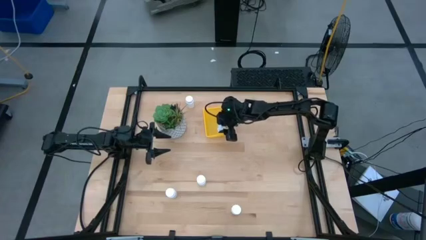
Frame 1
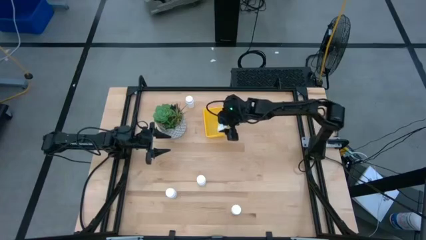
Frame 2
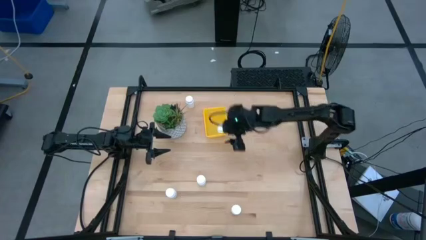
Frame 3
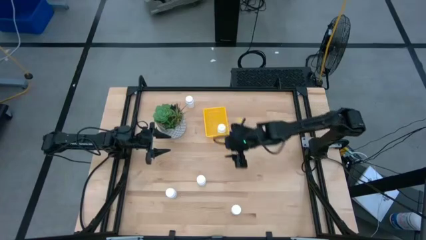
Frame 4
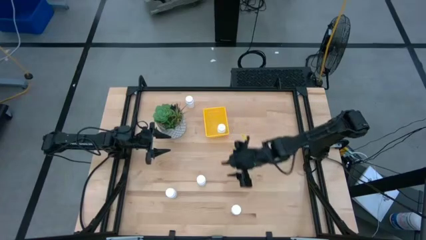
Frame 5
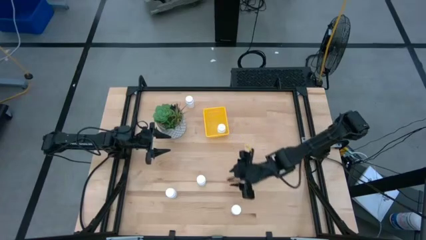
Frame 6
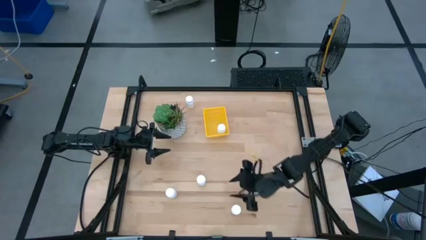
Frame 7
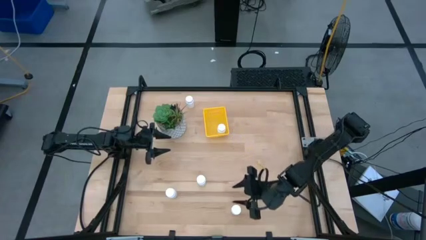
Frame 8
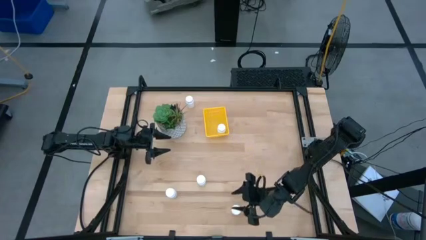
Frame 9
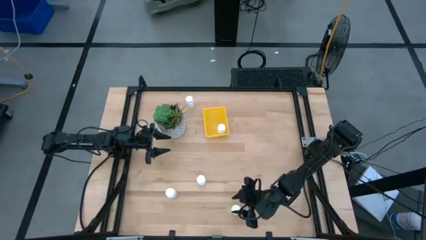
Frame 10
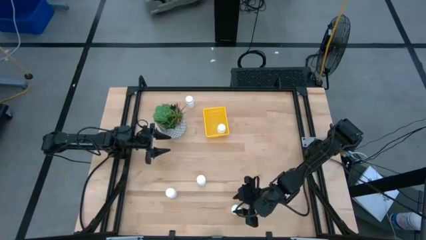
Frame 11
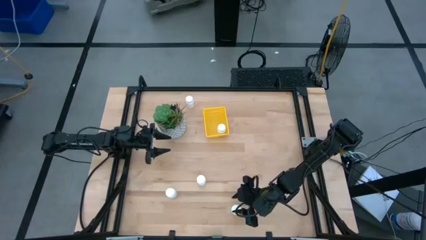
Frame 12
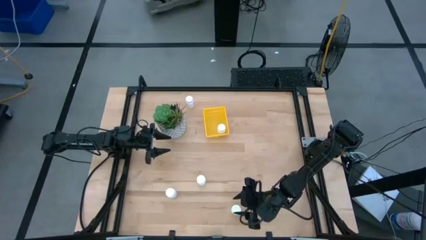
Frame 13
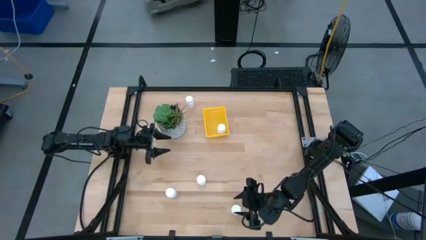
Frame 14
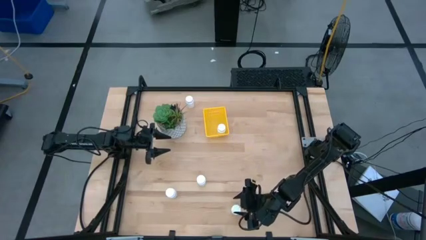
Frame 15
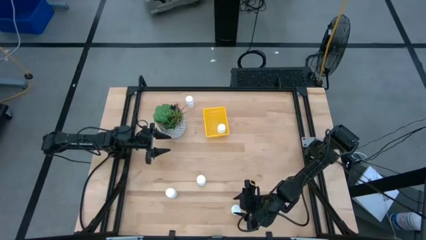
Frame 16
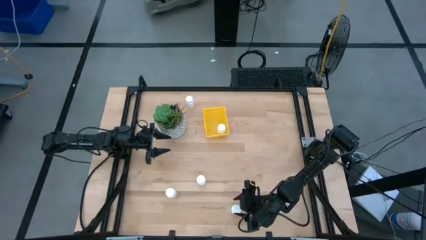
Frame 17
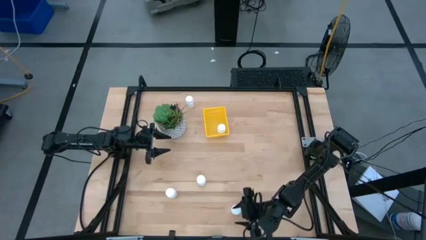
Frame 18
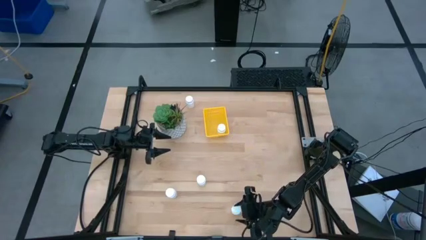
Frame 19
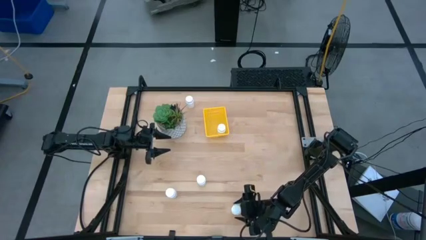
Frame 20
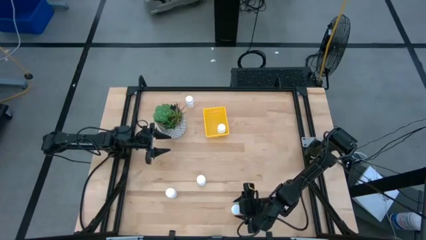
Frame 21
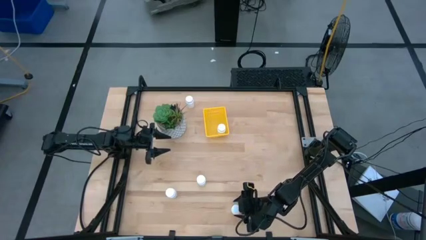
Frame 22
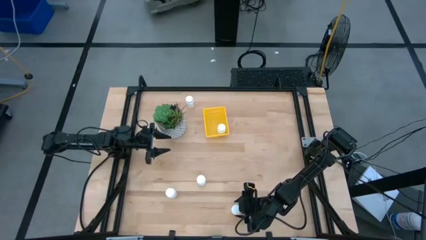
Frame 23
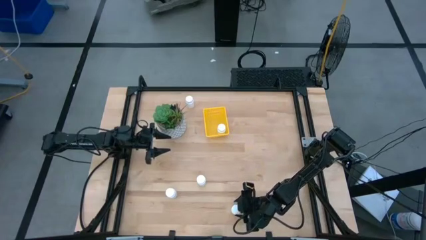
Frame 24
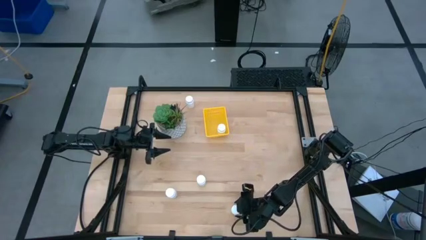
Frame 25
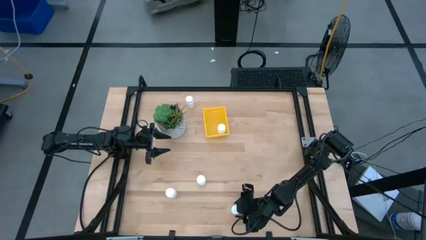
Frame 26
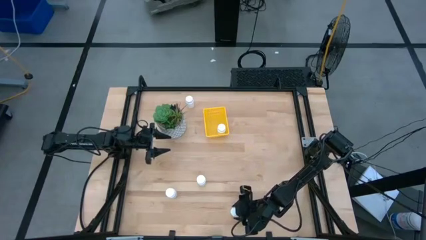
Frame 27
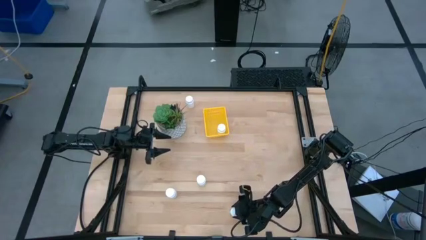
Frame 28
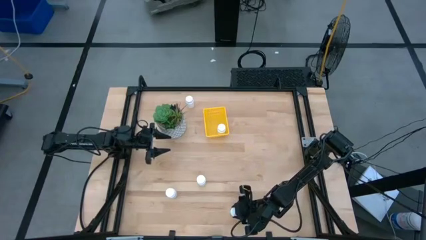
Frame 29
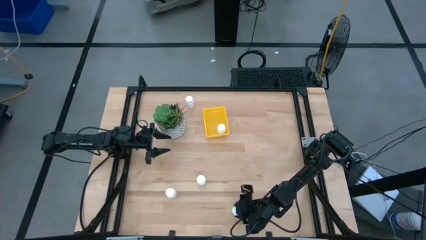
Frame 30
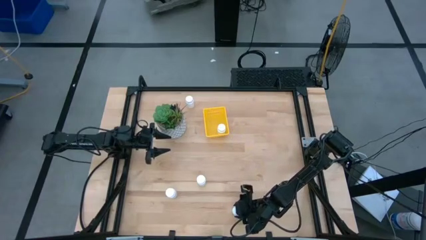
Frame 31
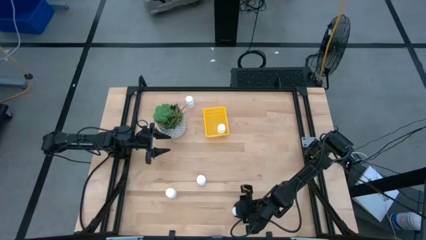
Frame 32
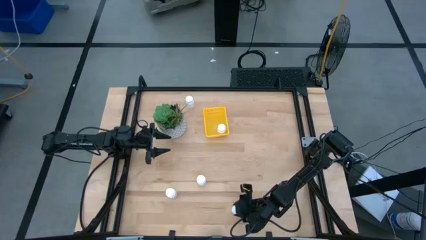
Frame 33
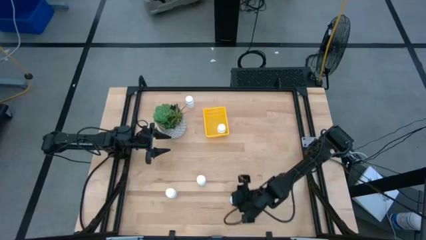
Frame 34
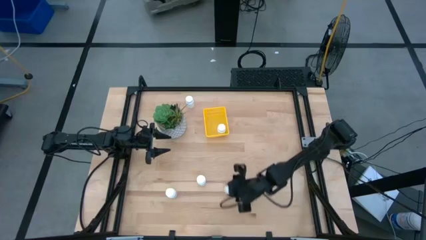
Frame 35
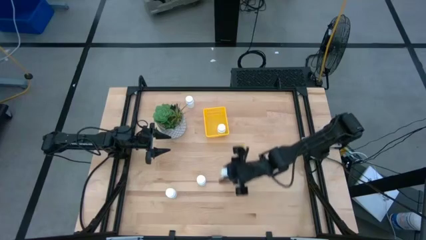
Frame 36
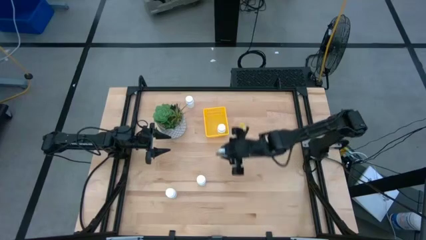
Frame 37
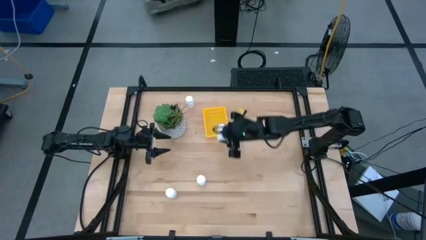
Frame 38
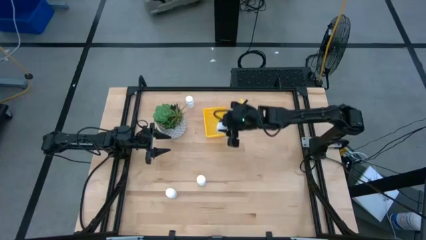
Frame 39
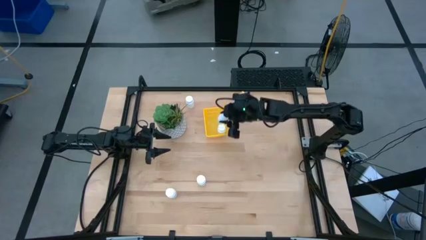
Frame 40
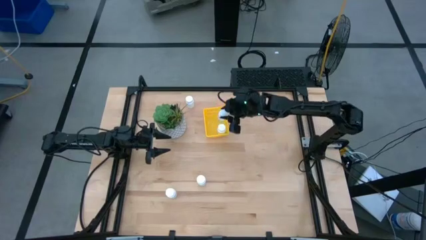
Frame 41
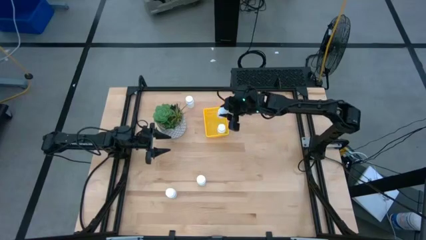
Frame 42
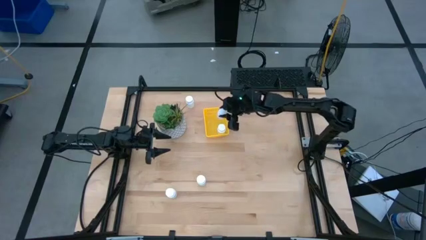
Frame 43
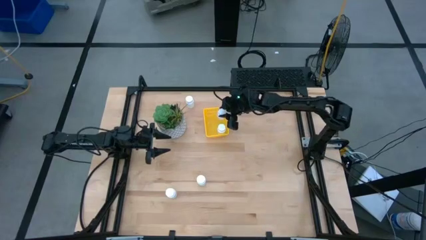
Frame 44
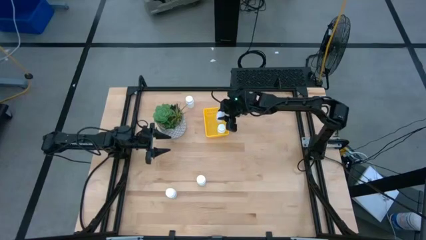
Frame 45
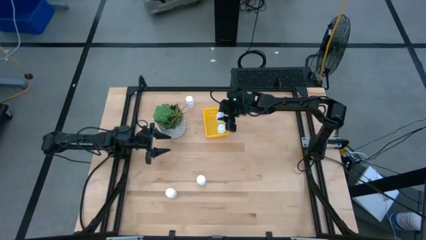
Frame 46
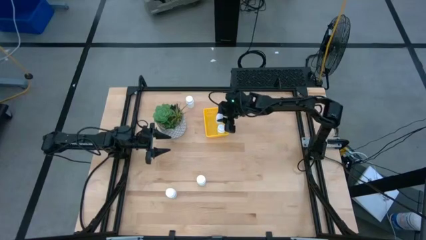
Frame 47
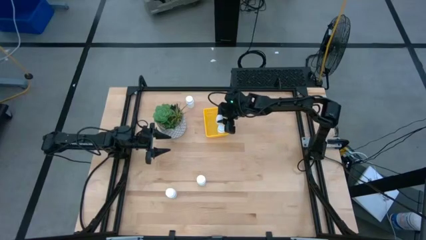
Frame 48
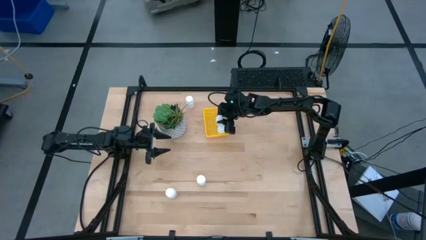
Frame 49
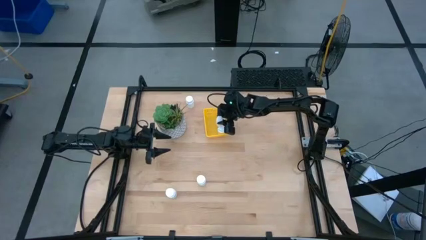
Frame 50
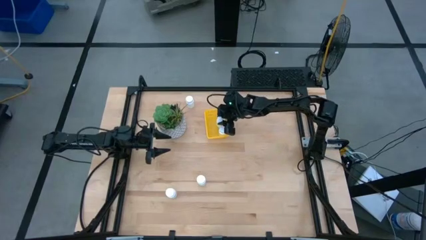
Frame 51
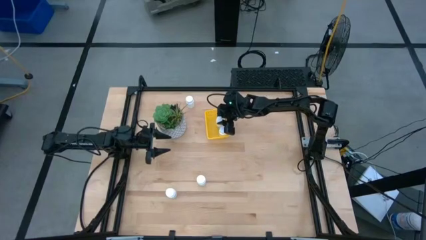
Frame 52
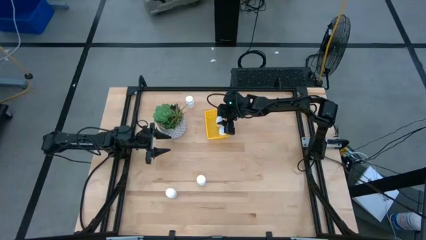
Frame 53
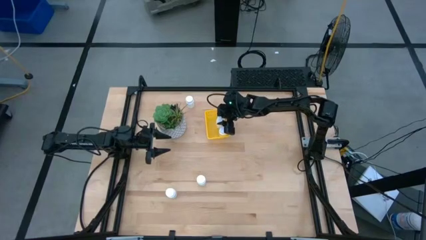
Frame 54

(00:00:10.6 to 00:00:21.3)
Task: Pick and place pill bottles into a basket
Put the white pill bottle into the yellow bin
